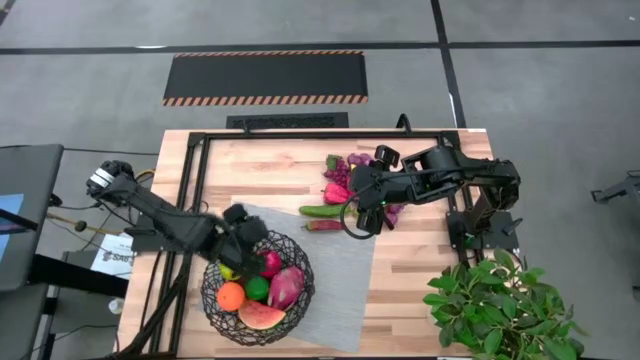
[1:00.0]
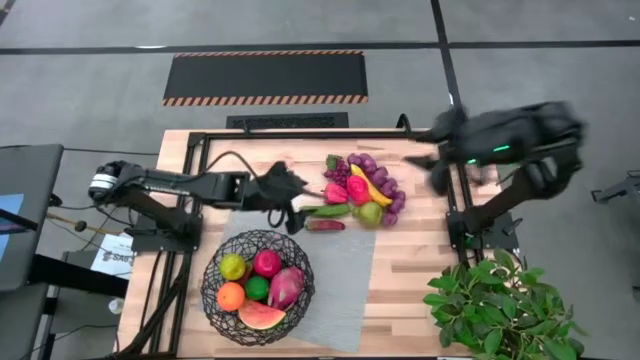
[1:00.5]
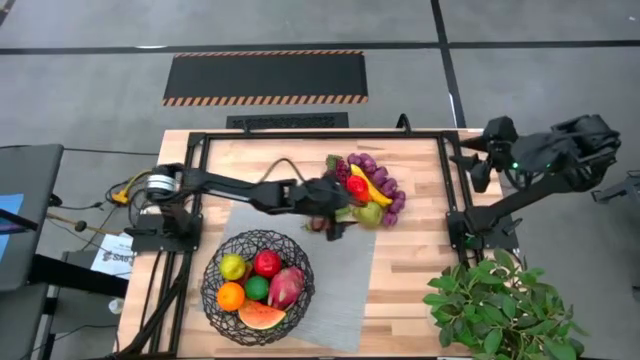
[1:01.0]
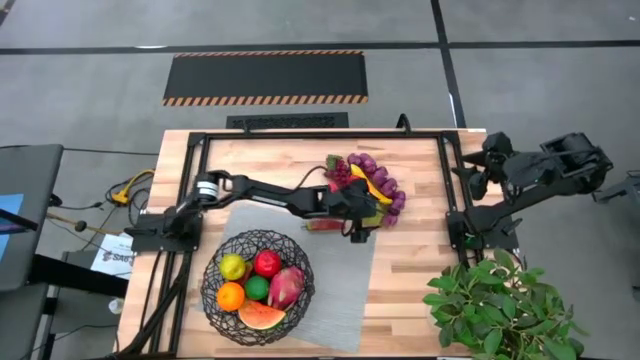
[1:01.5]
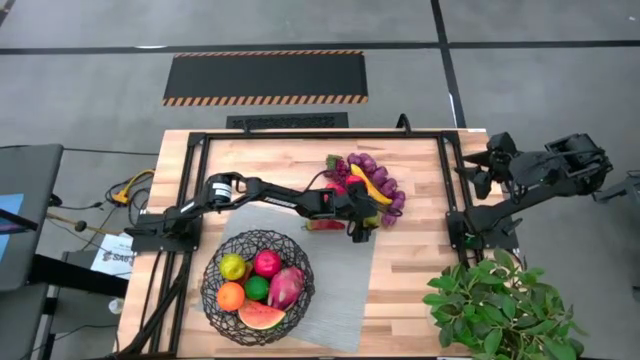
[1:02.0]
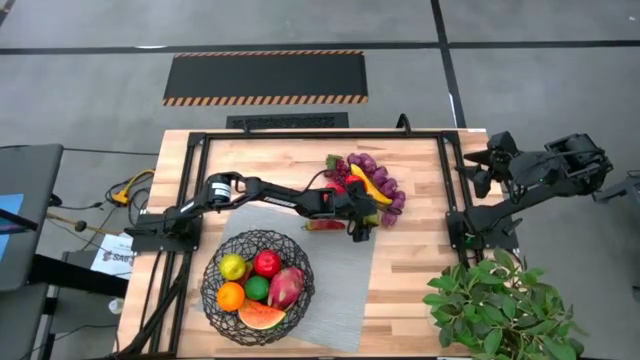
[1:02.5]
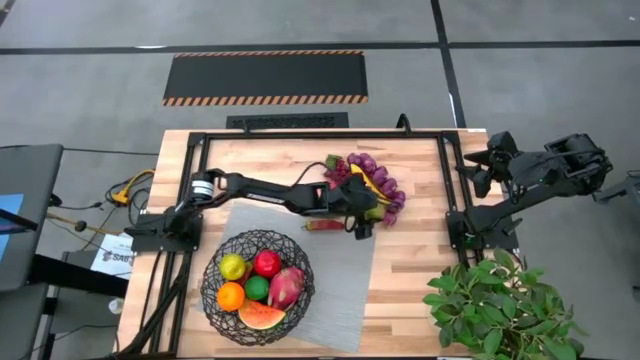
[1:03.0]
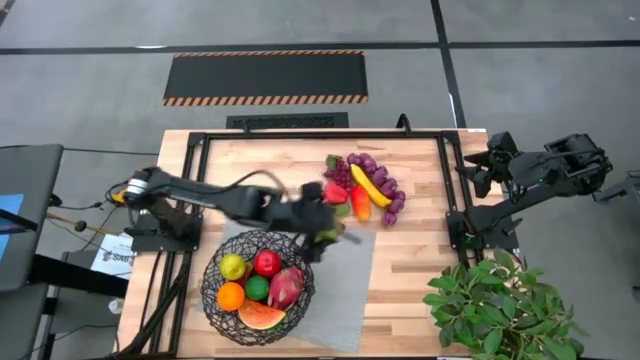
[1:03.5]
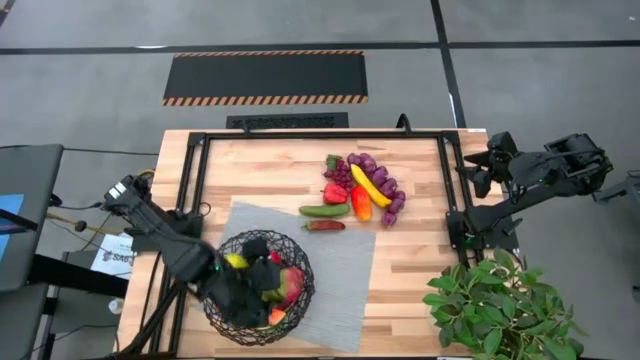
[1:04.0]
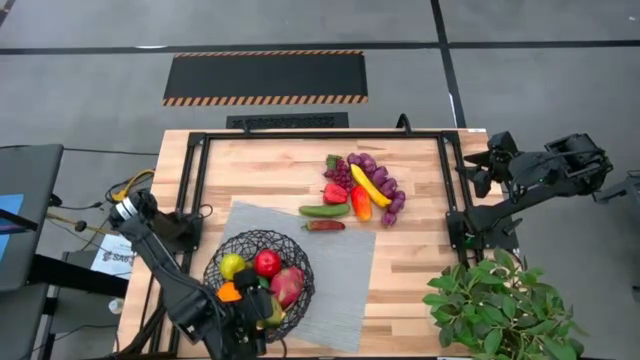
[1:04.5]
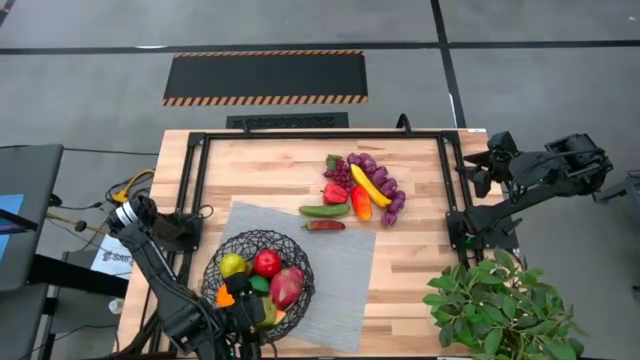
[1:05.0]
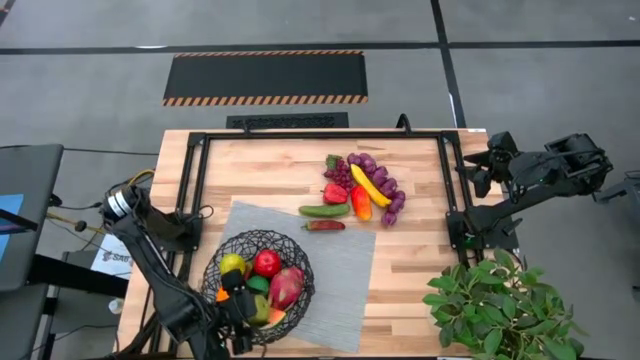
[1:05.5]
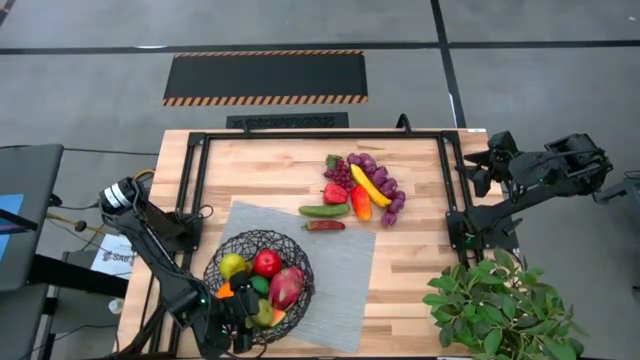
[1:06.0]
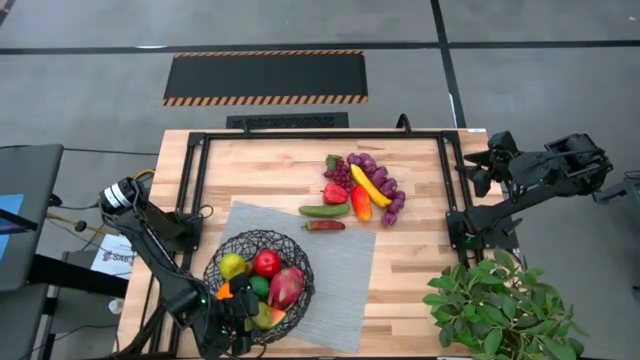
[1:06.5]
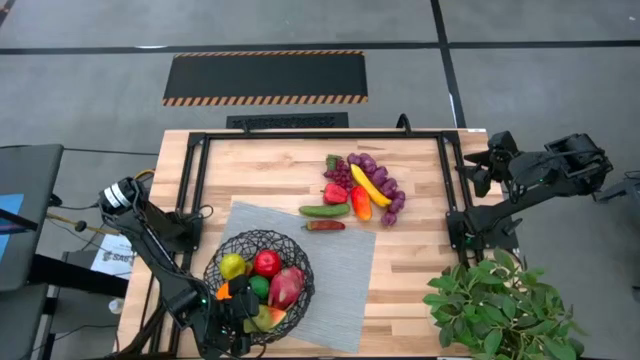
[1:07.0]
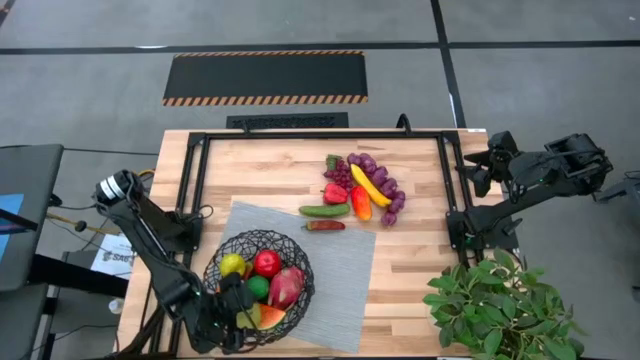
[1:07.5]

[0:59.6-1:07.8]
Task: Build produce basket
Put the green pear into the mesh basket

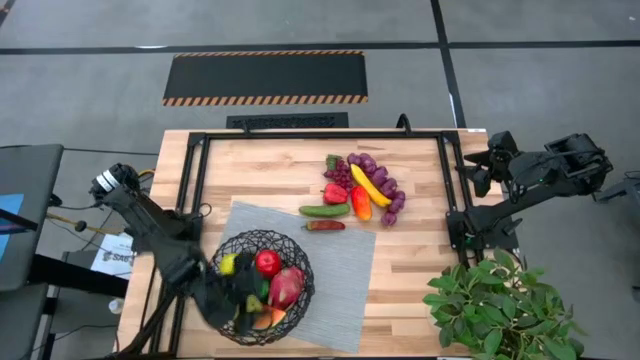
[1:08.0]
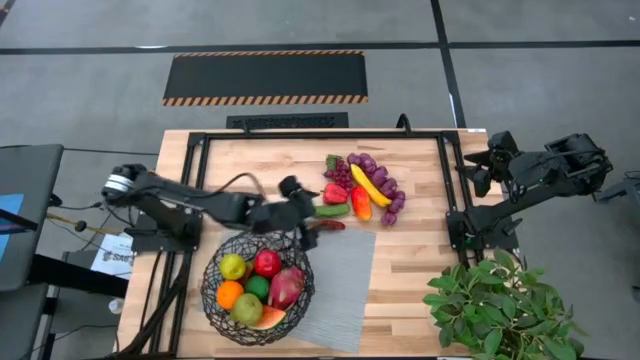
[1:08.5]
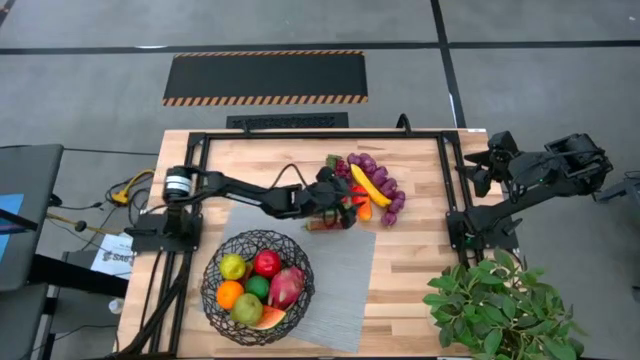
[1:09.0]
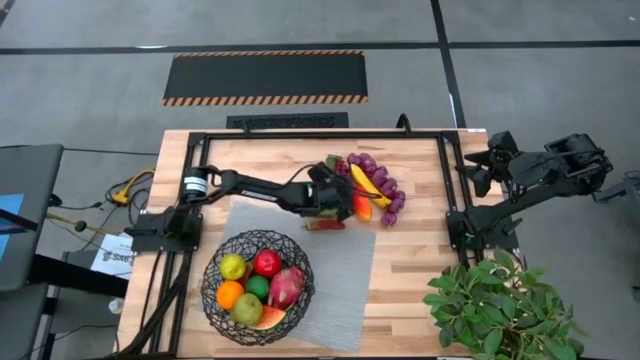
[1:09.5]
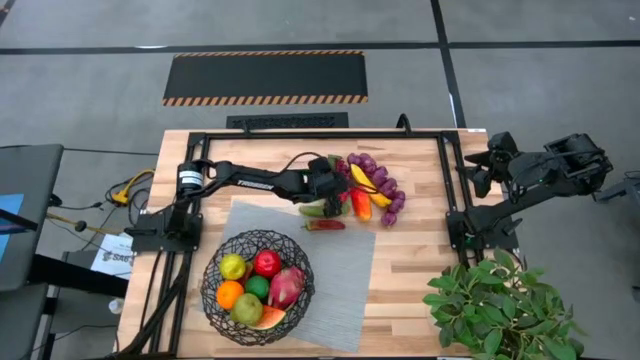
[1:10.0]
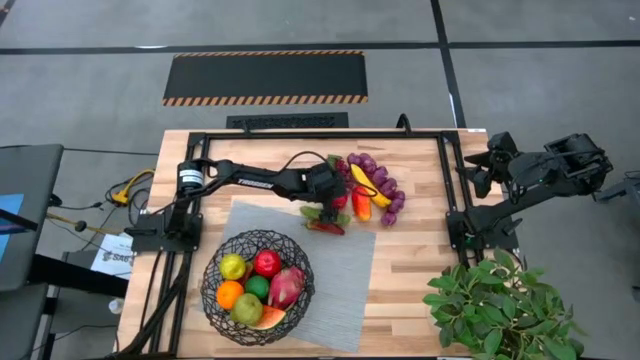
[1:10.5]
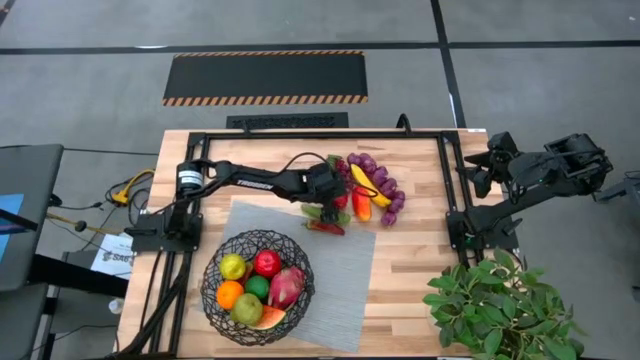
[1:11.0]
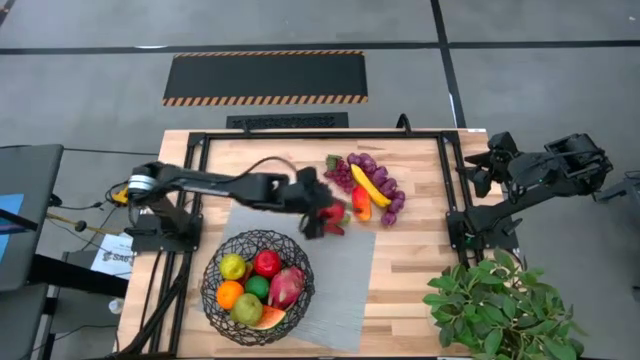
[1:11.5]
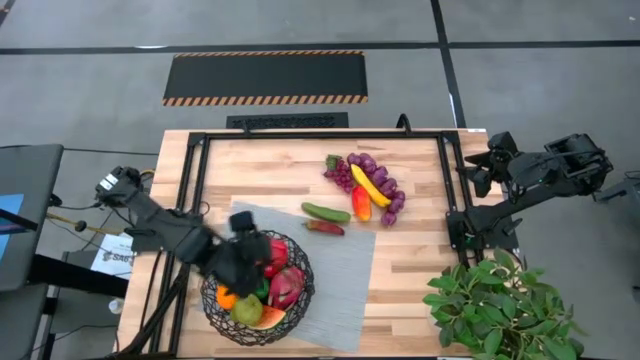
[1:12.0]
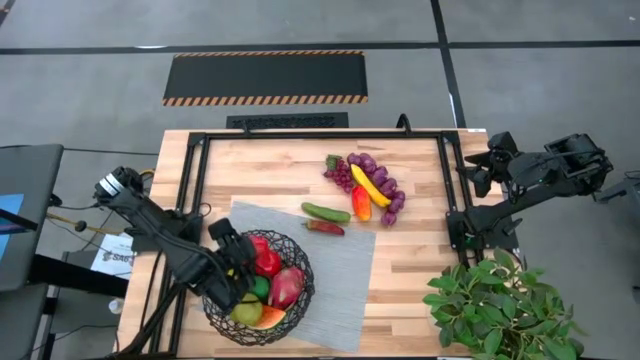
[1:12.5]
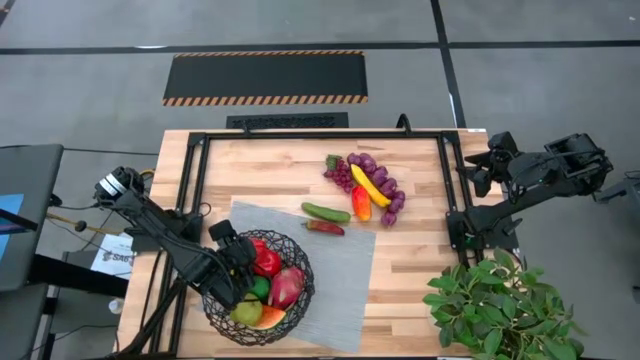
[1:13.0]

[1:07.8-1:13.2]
Put the red bell pepper into the mesh basket

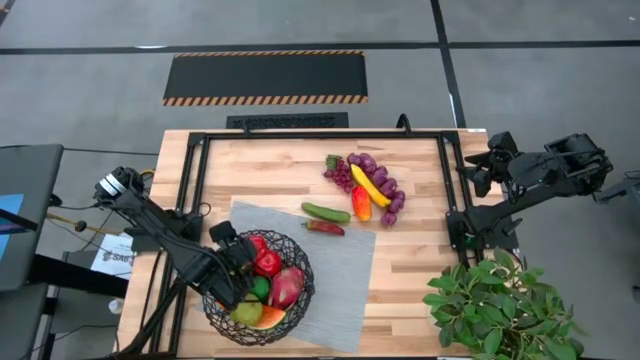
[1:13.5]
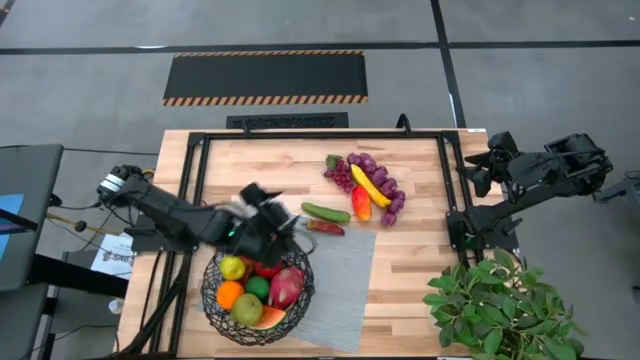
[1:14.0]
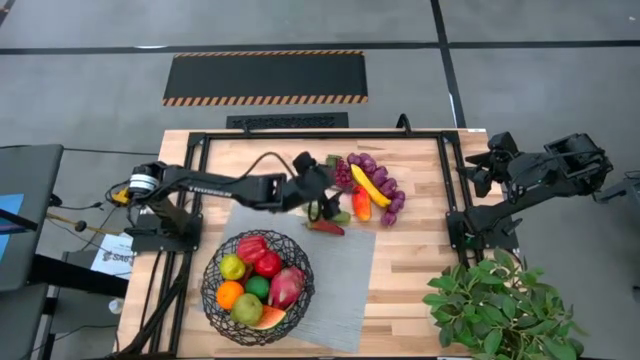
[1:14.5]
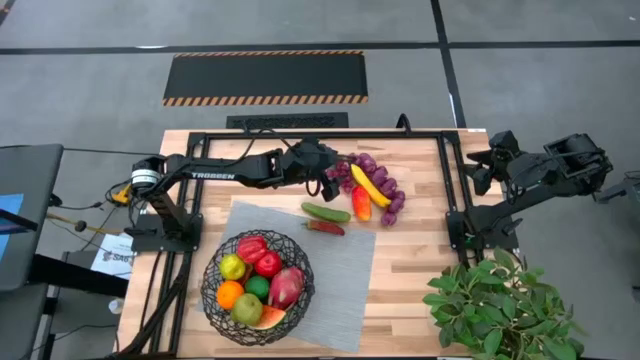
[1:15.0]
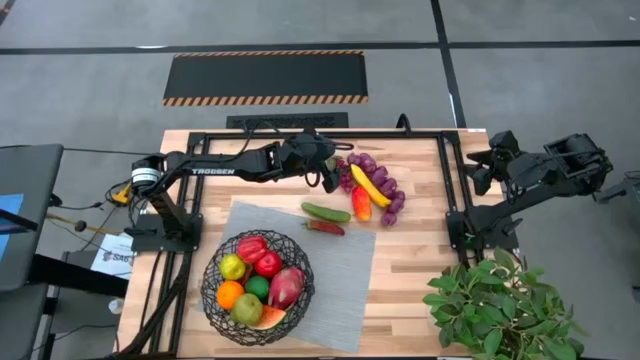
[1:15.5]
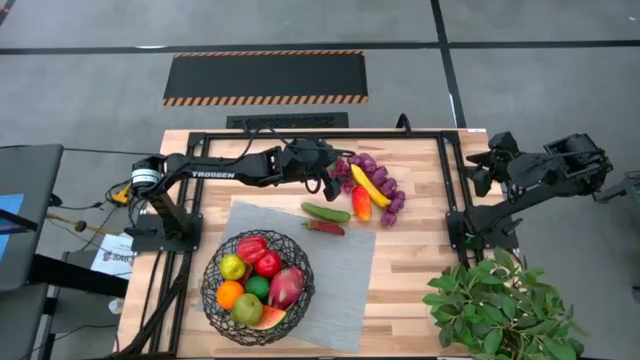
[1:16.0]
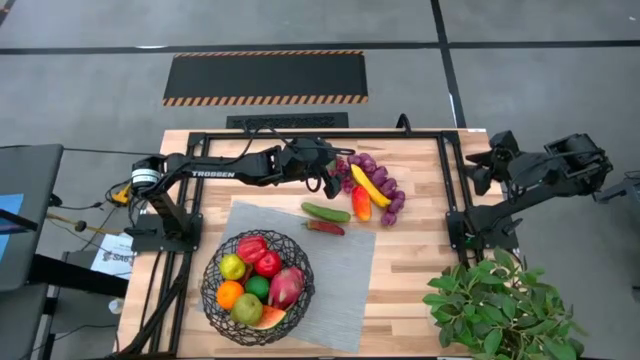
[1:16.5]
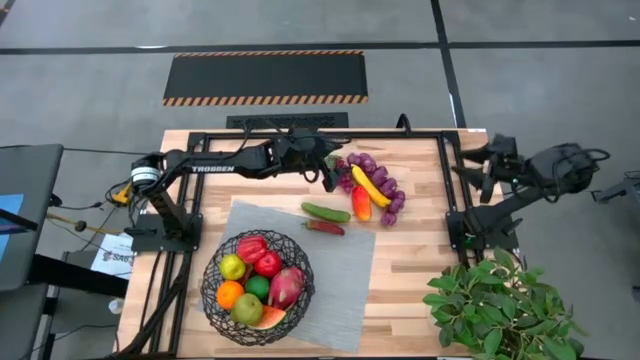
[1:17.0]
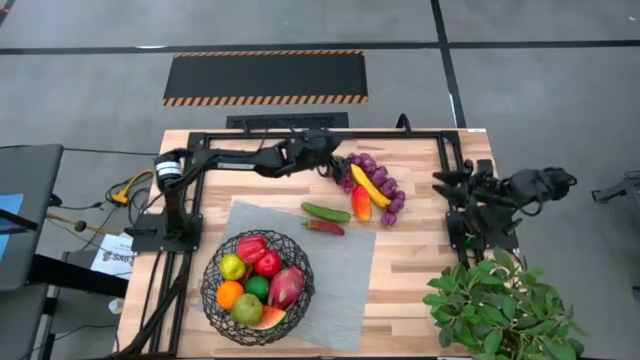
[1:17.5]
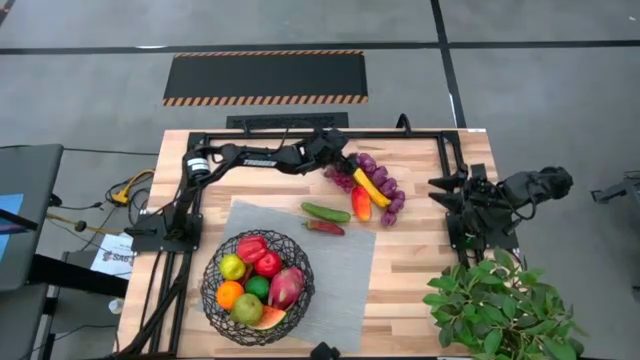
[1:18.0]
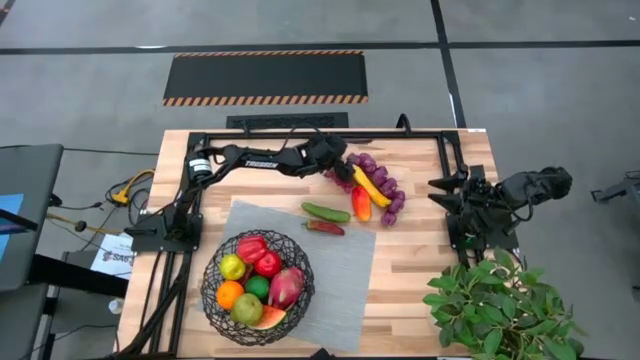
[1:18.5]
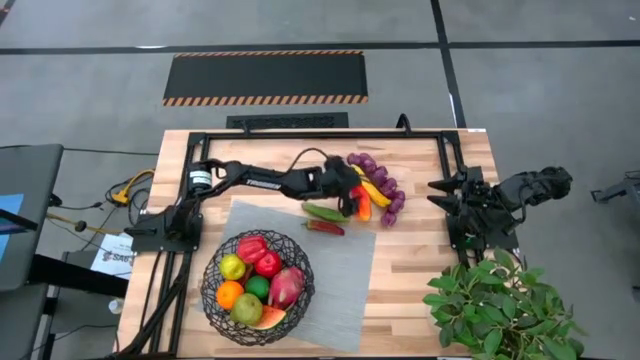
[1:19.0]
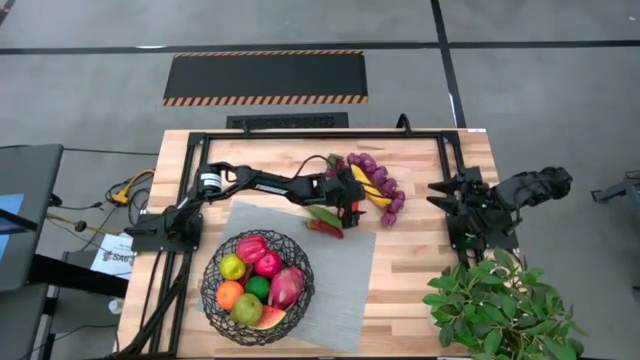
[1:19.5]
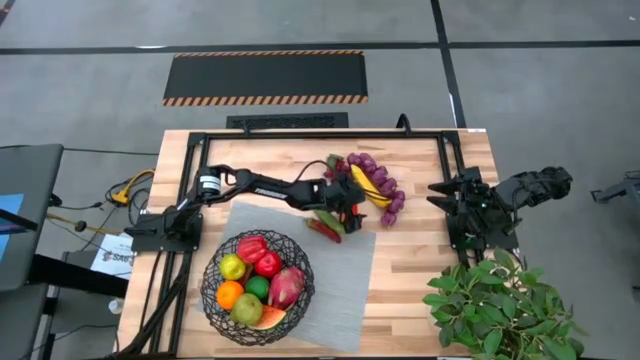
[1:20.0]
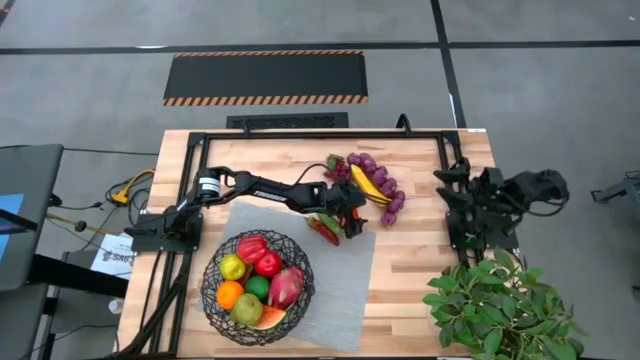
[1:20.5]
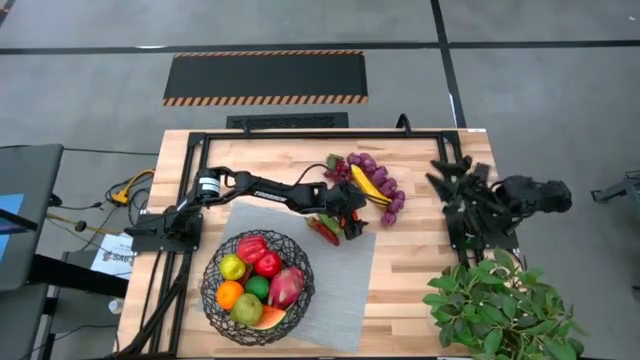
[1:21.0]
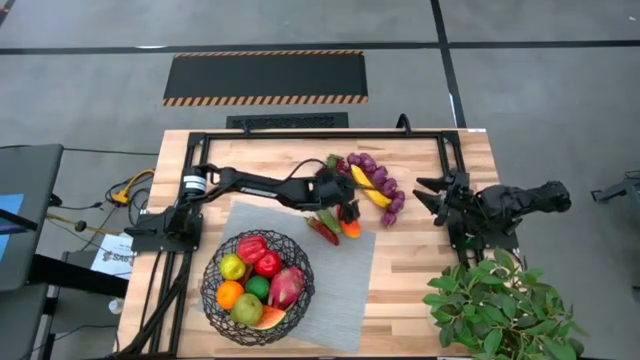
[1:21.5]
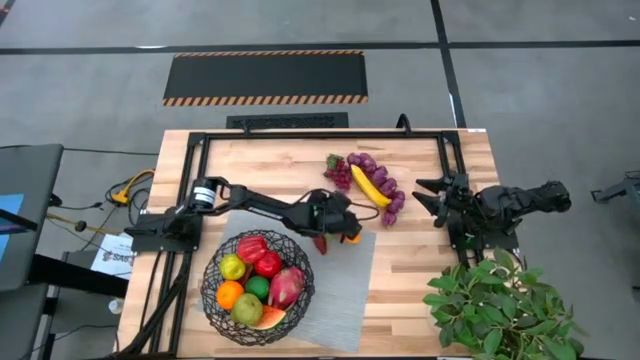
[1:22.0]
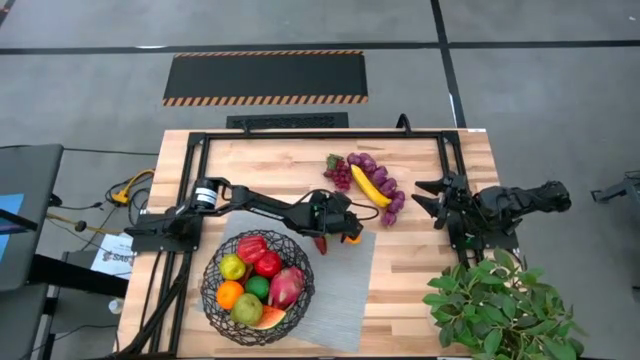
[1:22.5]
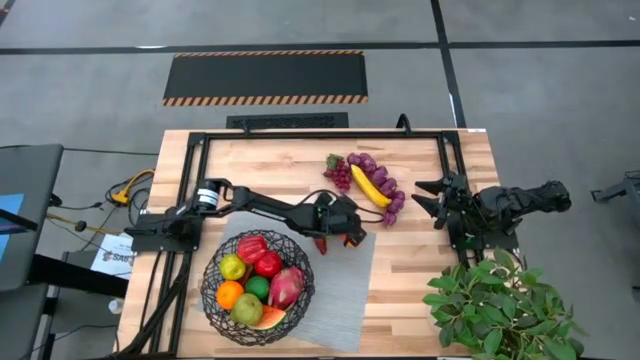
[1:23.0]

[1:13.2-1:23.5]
Put the orange mango into the mesh basket
